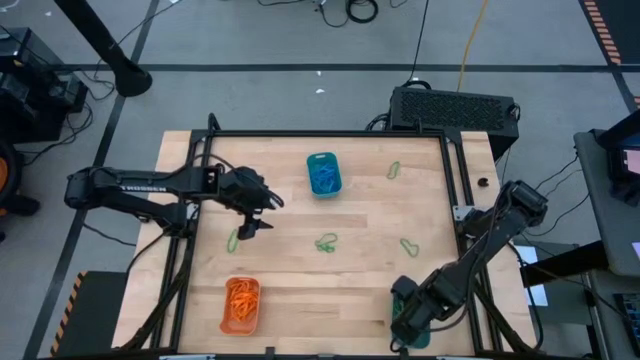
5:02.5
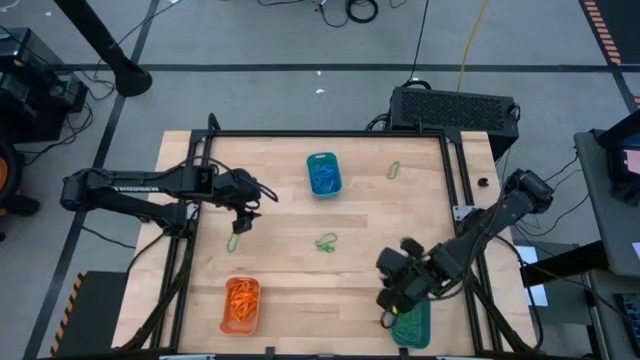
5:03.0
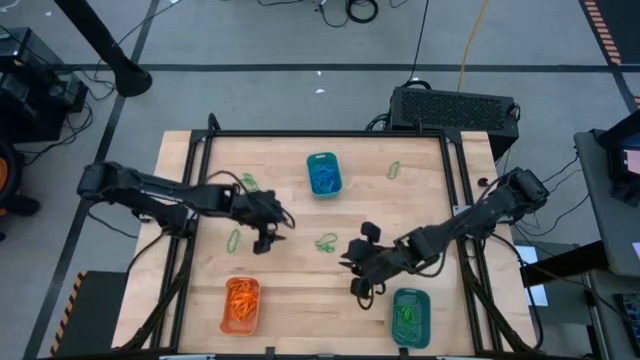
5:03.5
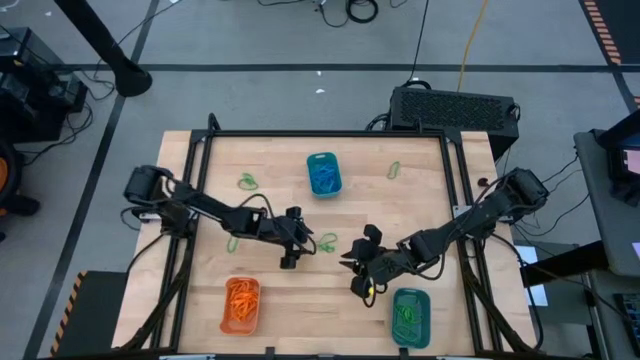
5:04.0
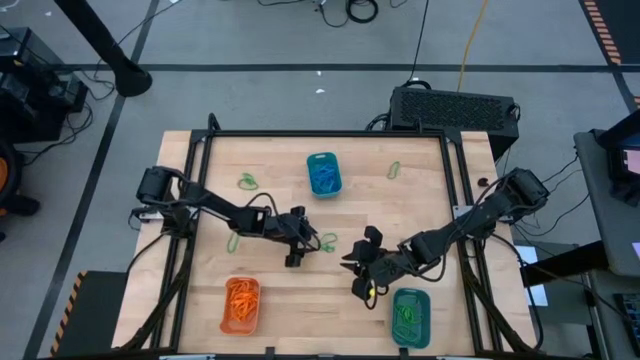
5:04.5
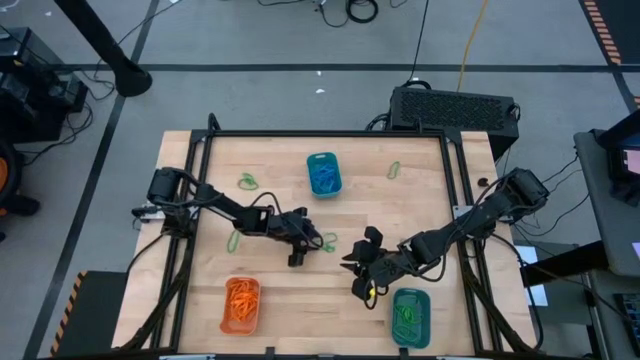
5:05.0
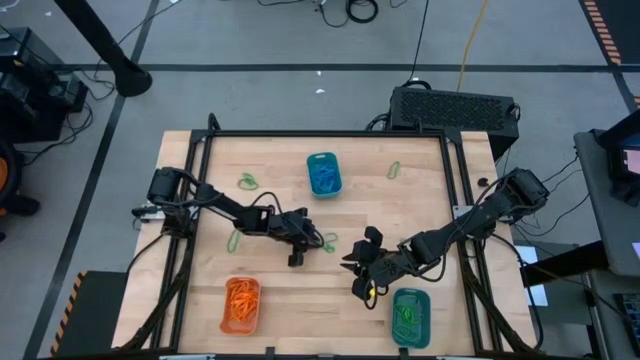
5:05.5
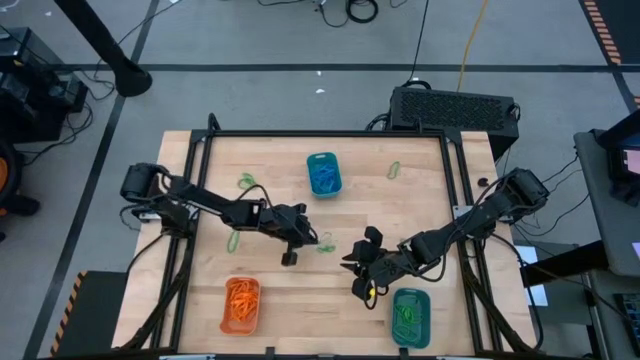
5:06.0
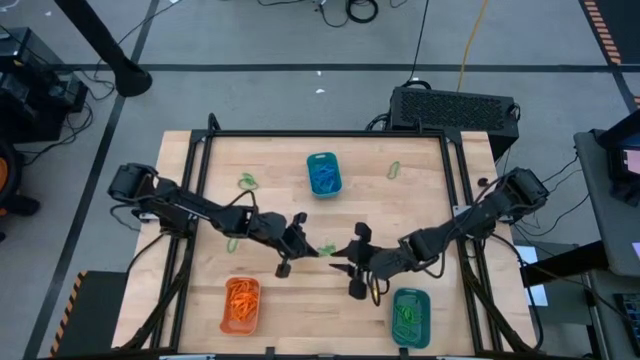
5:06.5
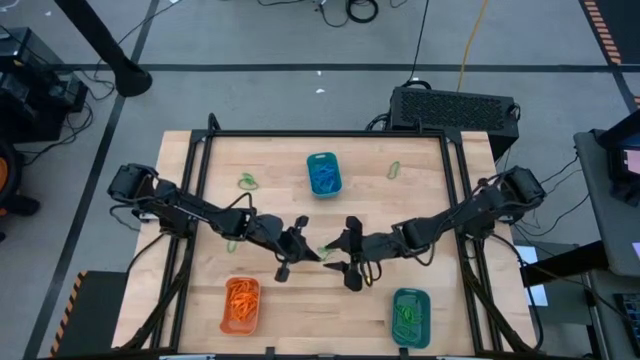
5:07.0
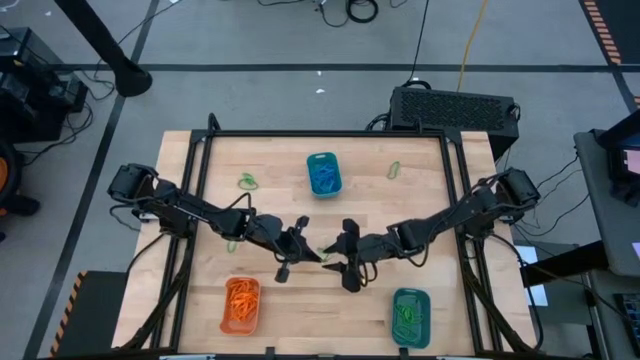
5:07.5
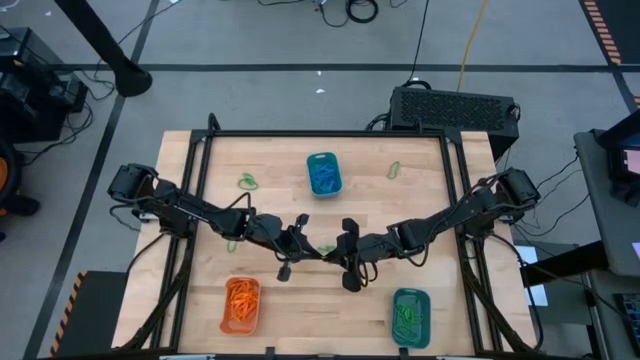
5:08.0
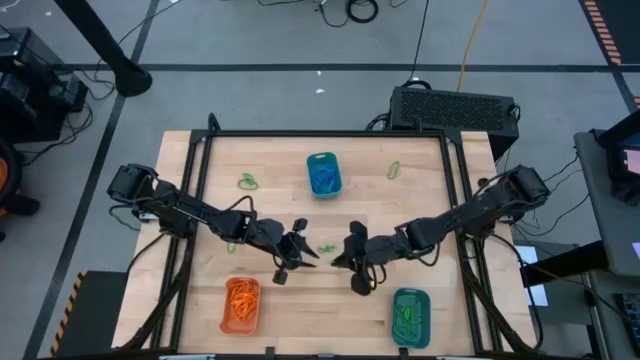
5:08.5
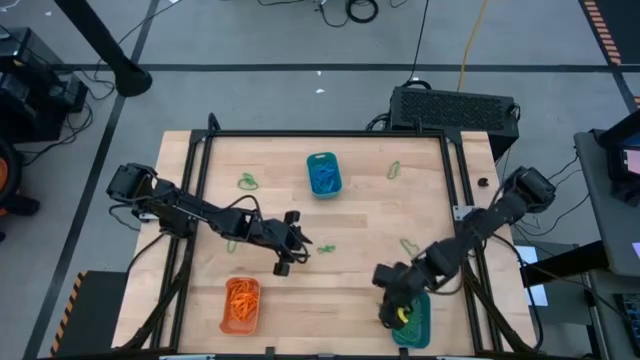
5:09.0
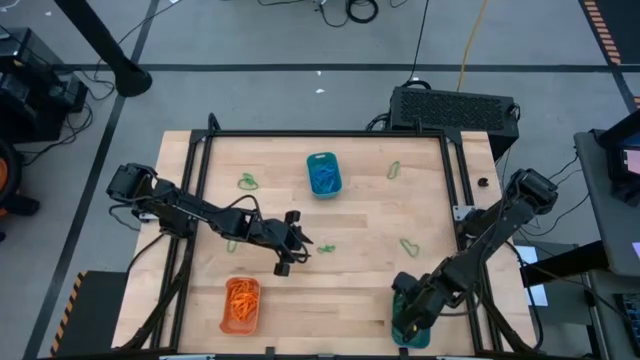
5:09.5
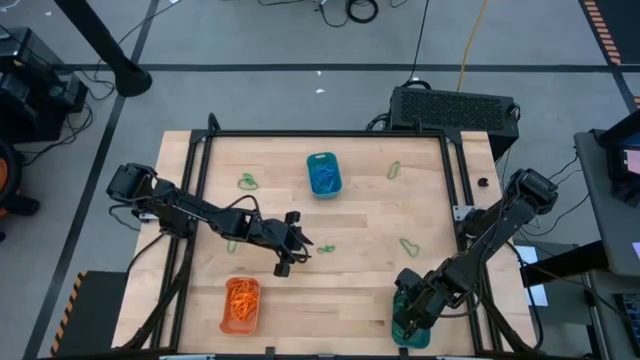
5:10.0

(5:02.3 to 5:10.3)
Task: Sort rubber bands into baskets
Put the green rubber band into the bottom bin

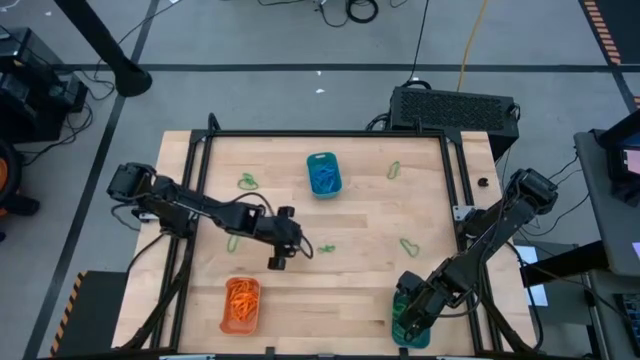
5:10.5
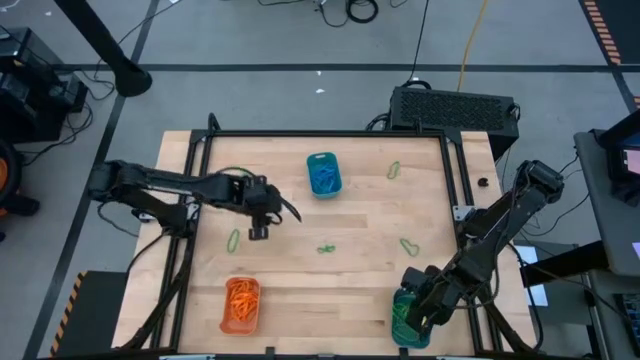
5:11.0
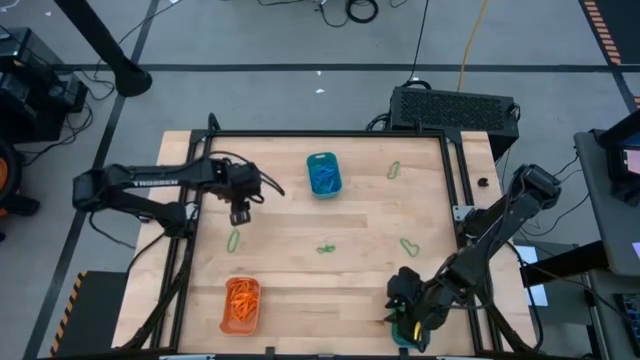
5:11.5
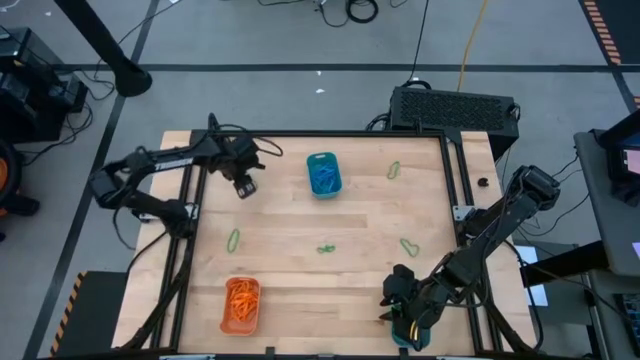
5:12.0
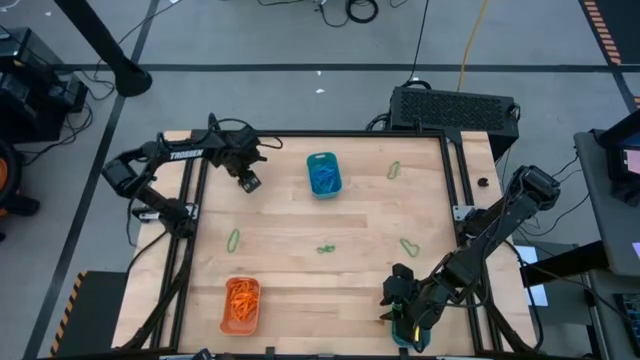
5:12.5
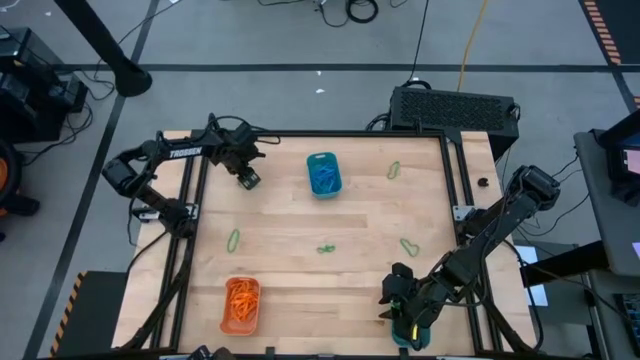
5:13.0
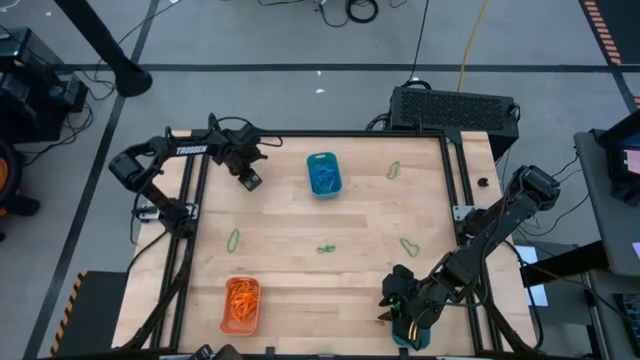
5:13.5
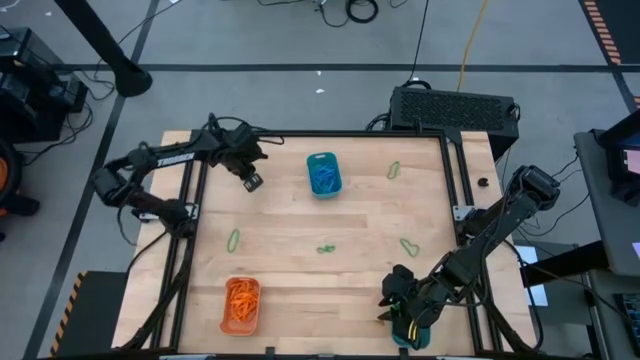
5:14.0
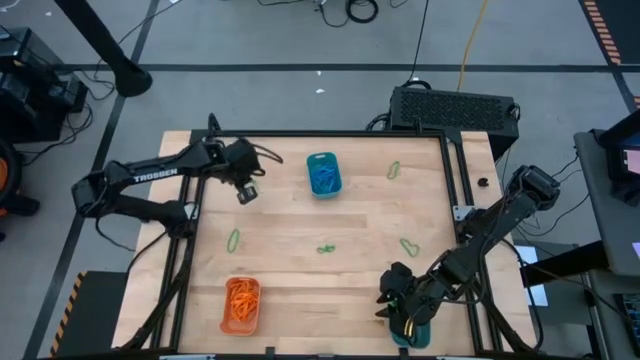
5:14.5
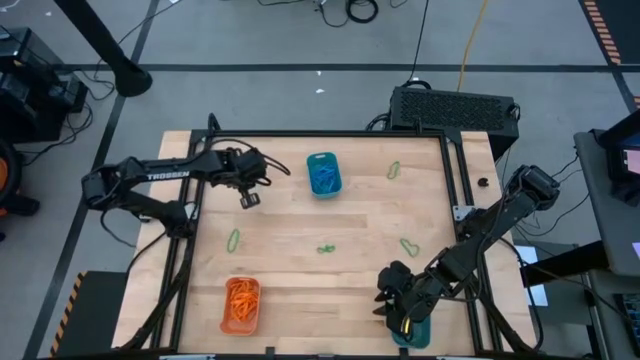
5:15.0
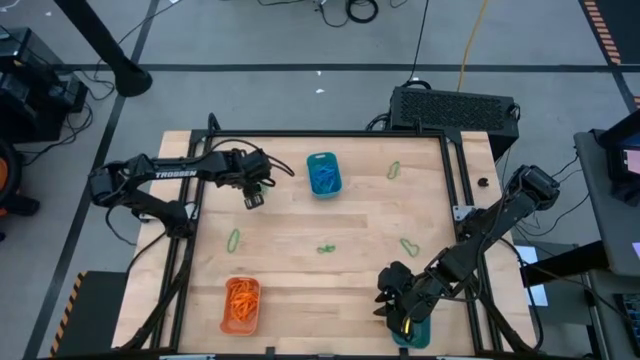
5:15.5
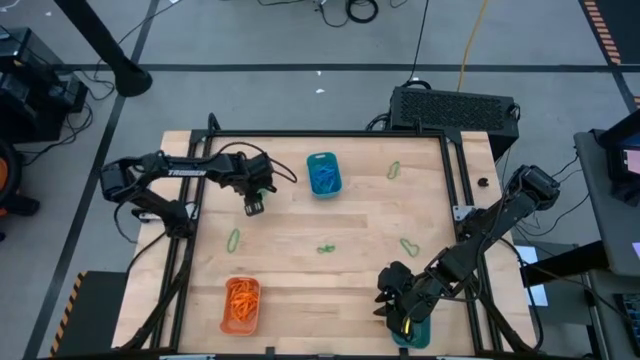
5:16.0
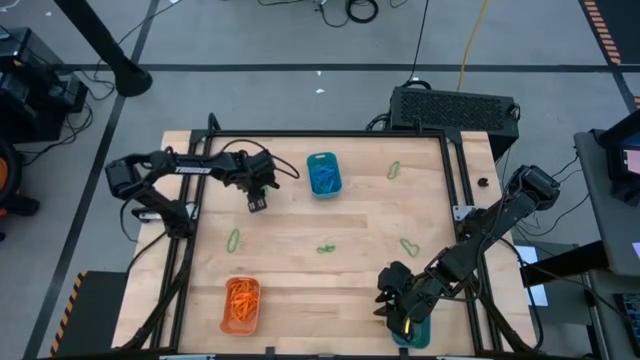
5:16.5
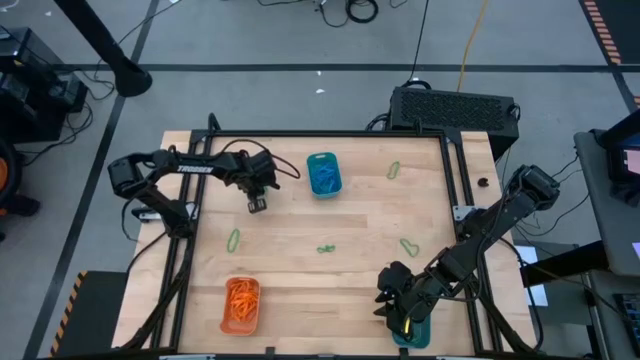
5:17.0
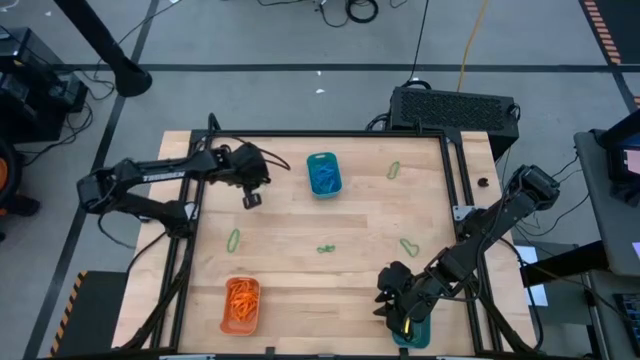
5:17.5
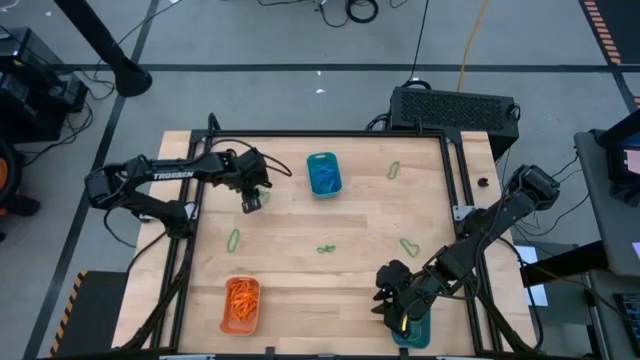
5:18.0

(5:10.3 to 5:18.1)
Put the green rubber band into the bottom bin

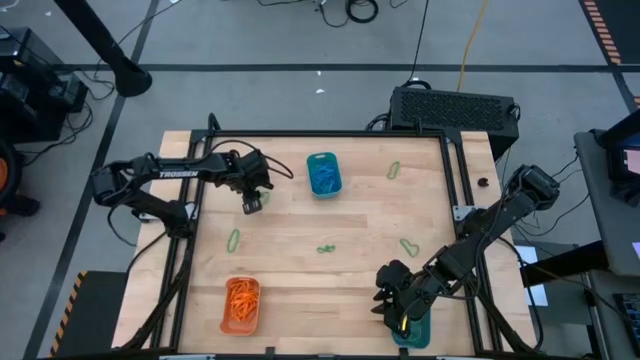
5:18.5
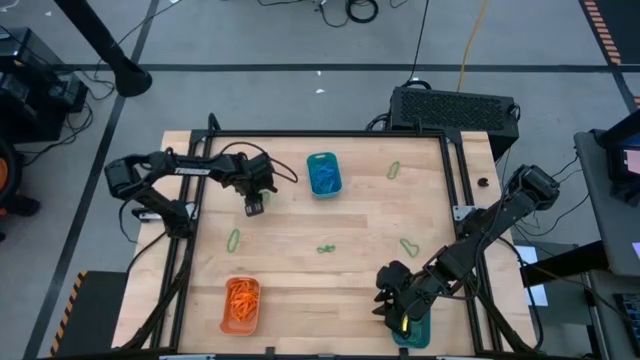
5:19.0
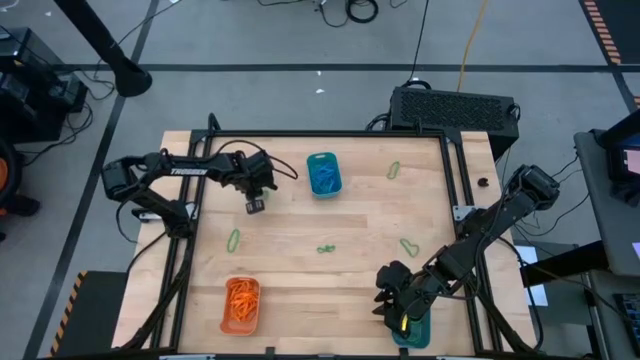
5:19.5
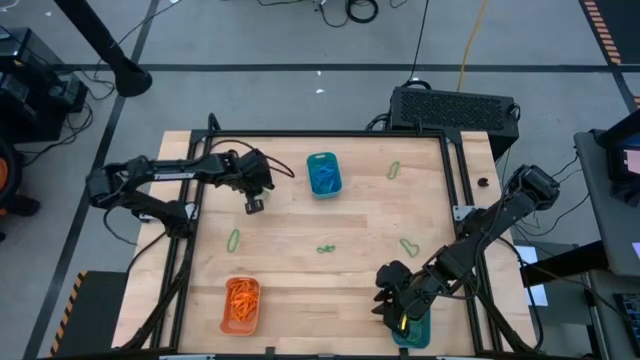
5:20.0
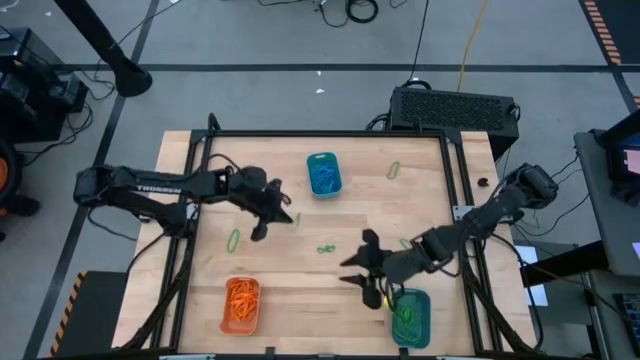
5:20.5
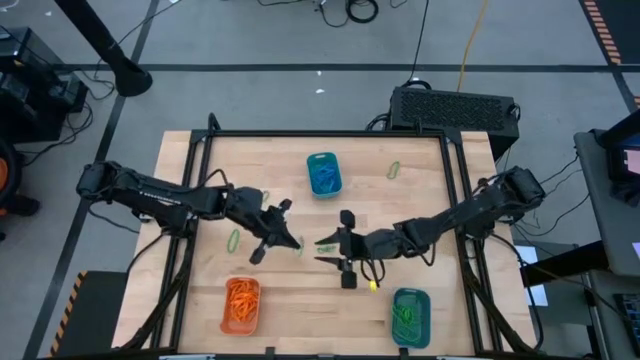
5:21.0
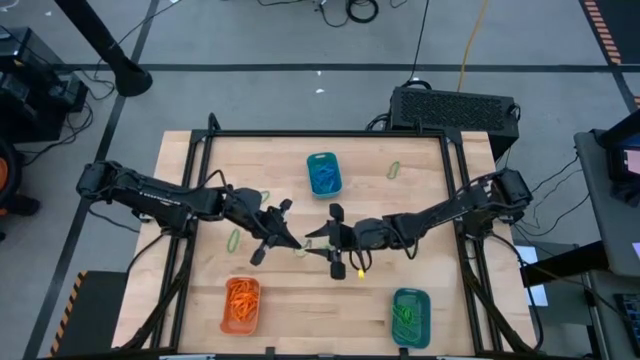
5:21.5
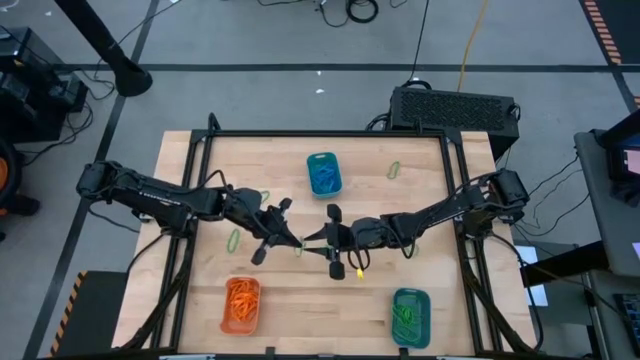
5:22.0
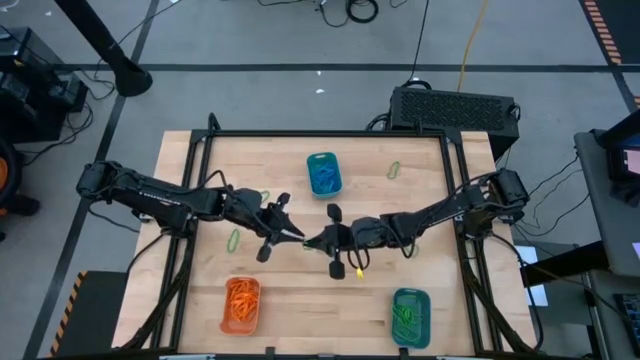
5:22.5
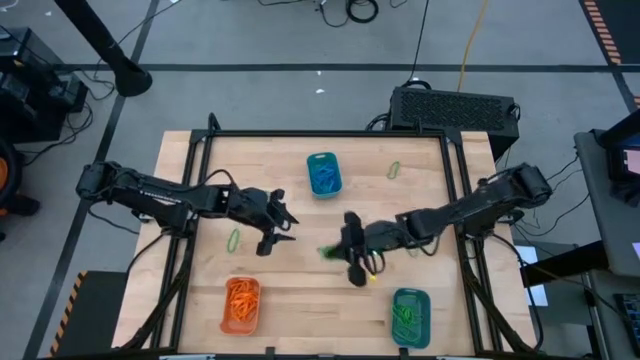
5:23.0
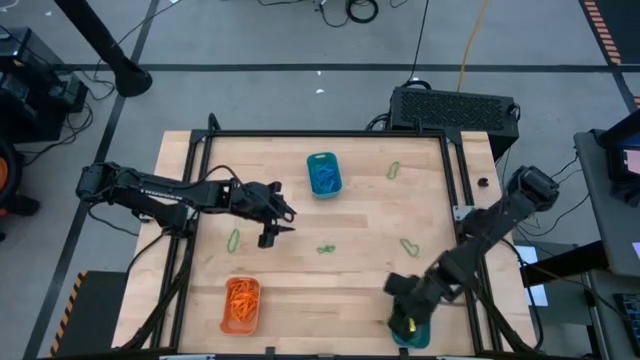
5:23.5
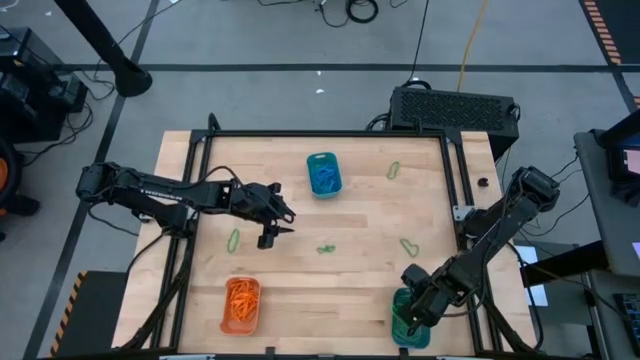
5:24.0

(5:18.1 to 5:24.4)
Put the green rubber band into the bottom bin
